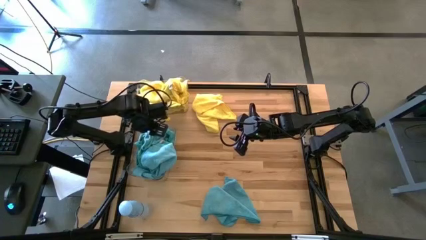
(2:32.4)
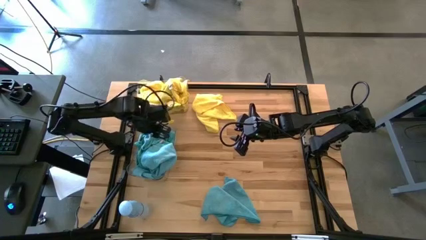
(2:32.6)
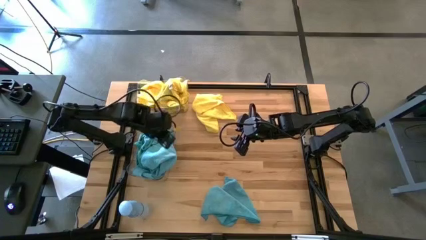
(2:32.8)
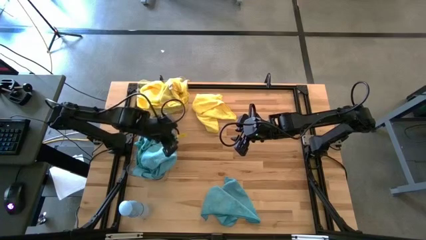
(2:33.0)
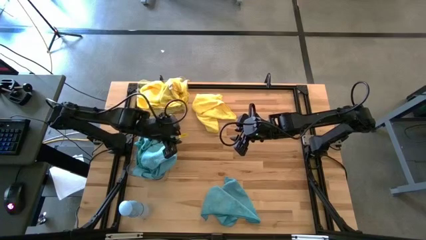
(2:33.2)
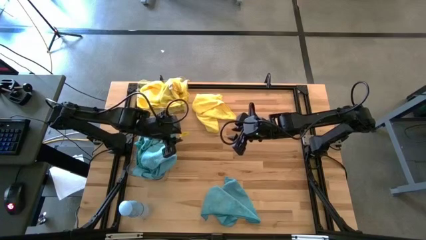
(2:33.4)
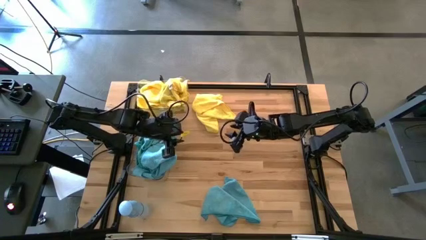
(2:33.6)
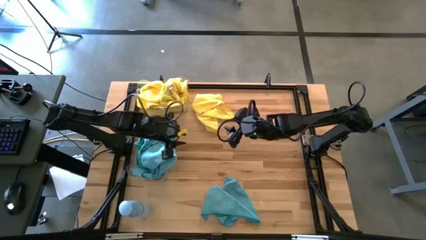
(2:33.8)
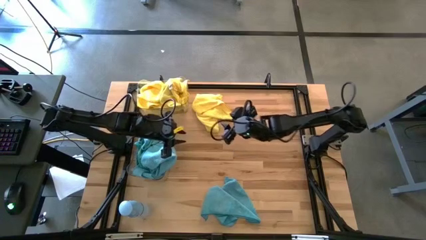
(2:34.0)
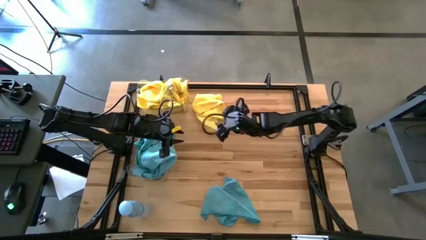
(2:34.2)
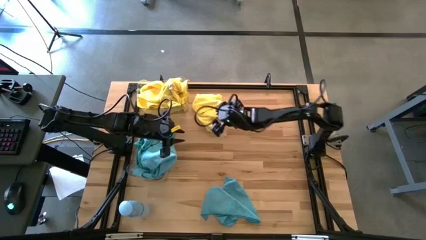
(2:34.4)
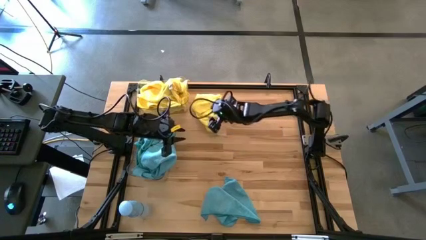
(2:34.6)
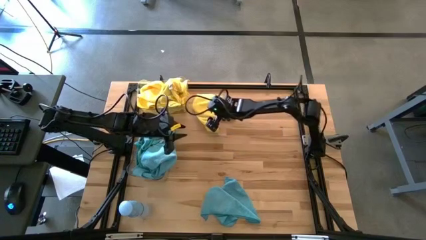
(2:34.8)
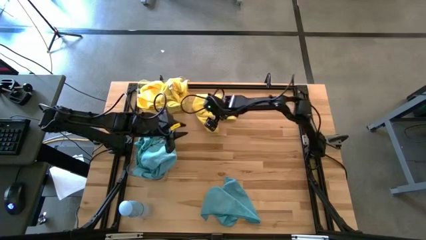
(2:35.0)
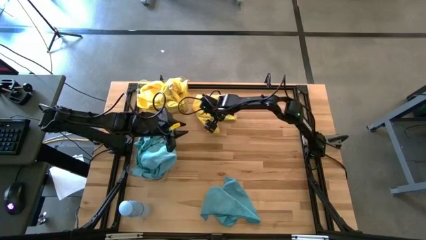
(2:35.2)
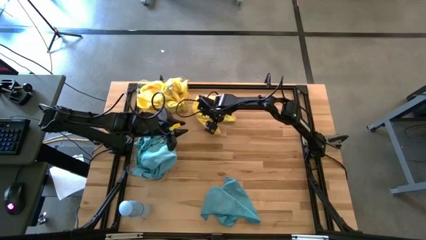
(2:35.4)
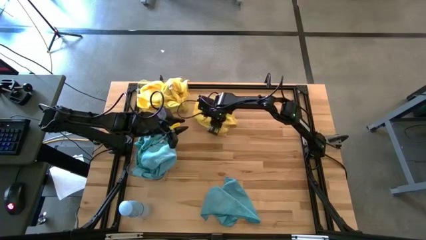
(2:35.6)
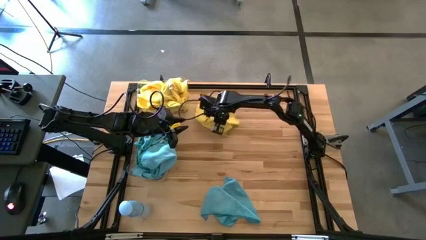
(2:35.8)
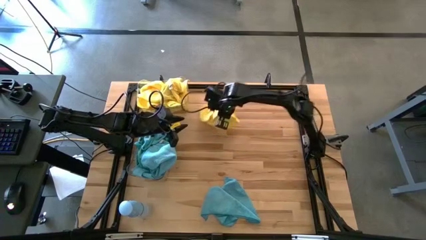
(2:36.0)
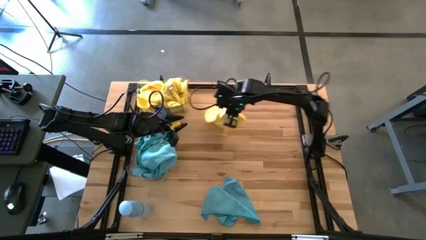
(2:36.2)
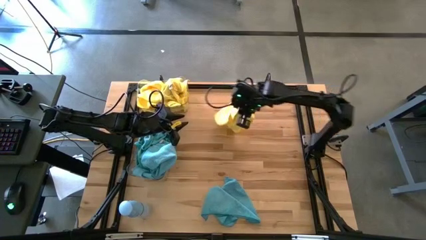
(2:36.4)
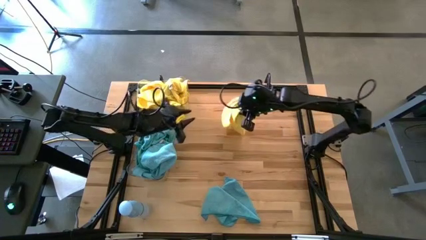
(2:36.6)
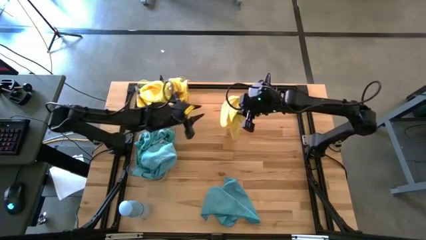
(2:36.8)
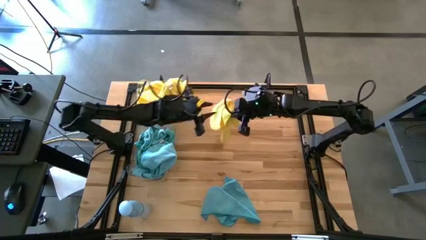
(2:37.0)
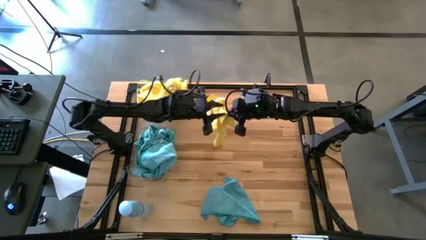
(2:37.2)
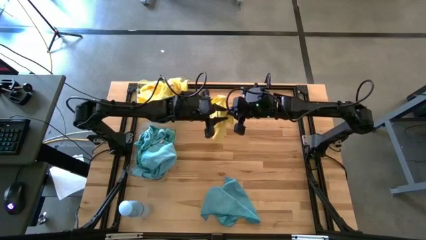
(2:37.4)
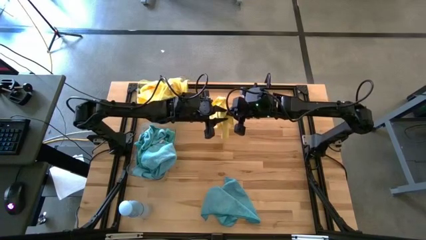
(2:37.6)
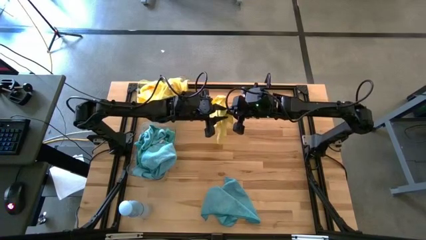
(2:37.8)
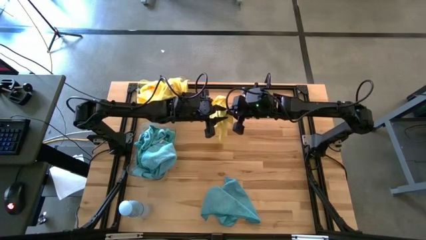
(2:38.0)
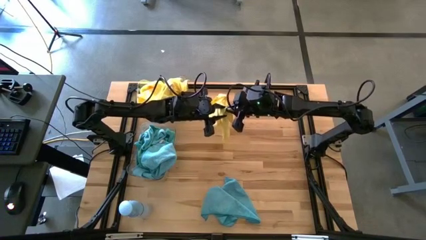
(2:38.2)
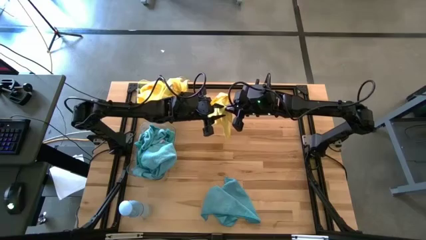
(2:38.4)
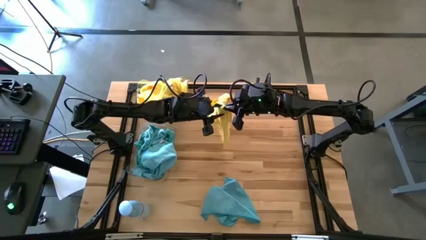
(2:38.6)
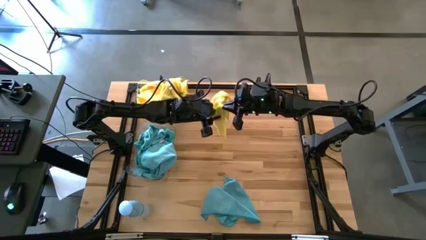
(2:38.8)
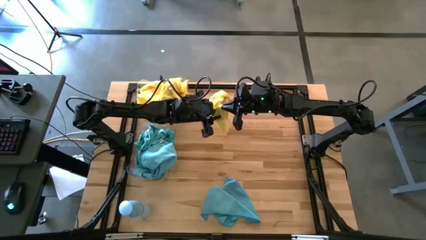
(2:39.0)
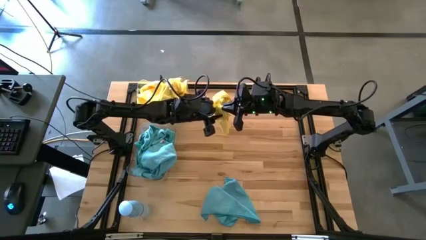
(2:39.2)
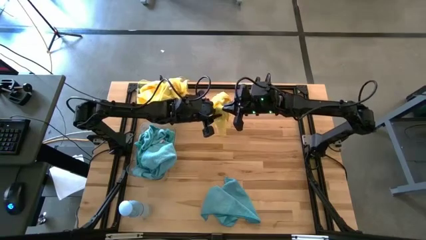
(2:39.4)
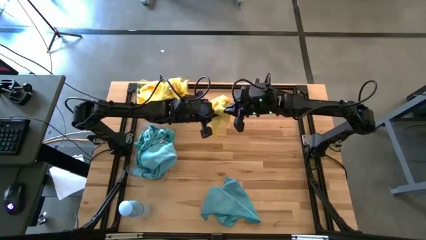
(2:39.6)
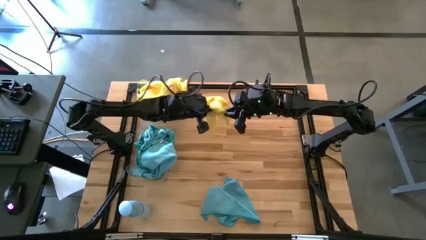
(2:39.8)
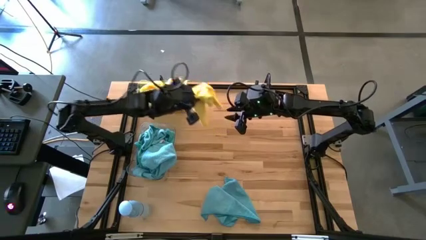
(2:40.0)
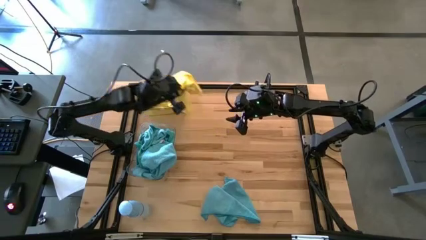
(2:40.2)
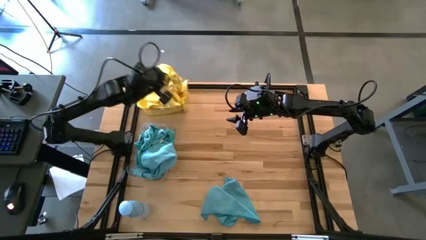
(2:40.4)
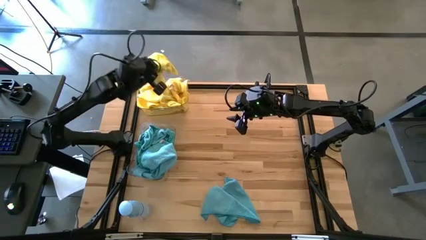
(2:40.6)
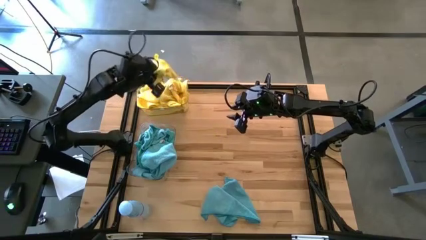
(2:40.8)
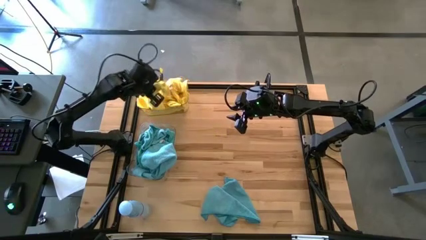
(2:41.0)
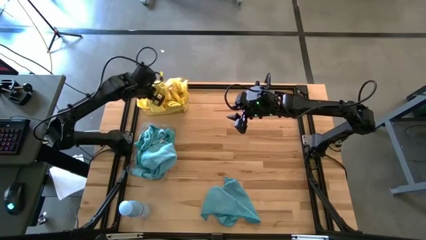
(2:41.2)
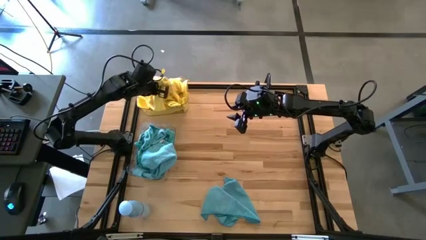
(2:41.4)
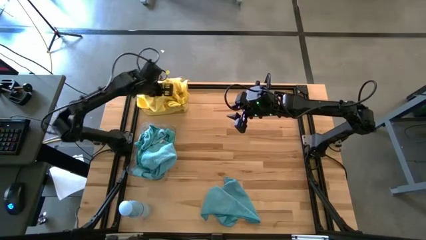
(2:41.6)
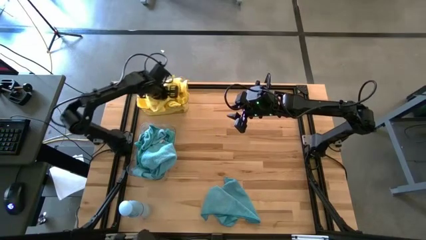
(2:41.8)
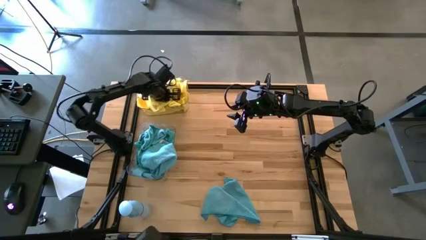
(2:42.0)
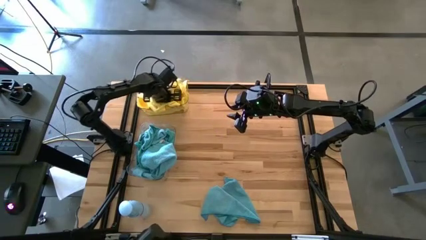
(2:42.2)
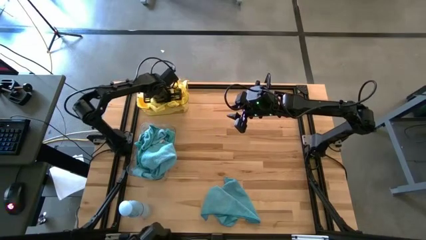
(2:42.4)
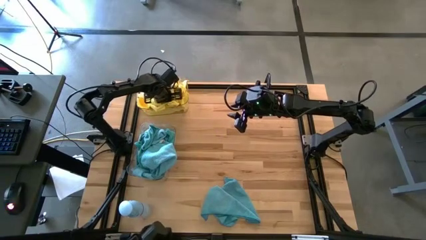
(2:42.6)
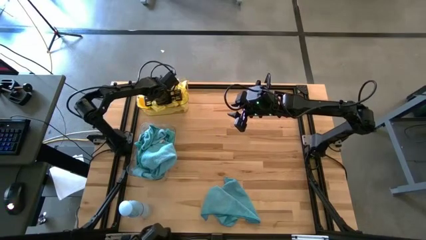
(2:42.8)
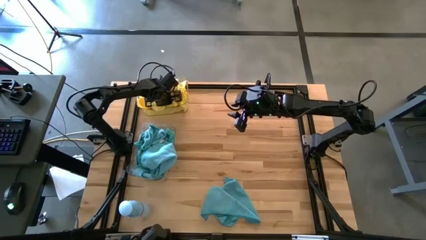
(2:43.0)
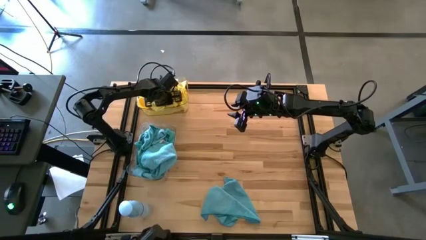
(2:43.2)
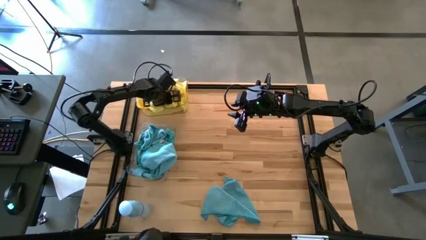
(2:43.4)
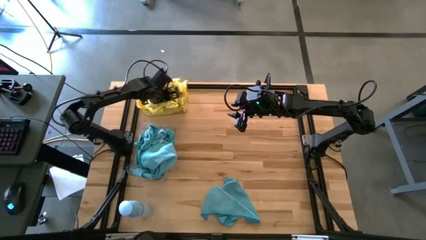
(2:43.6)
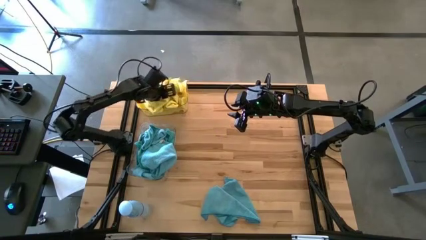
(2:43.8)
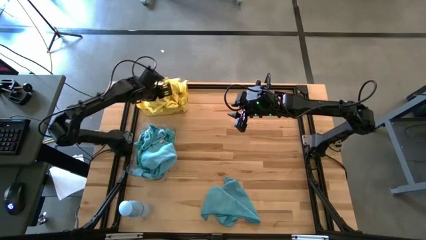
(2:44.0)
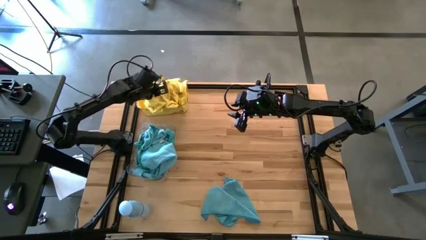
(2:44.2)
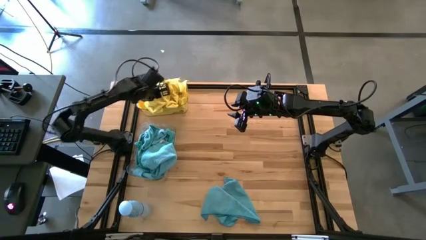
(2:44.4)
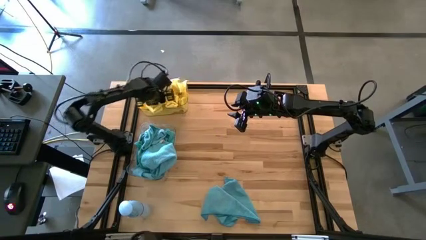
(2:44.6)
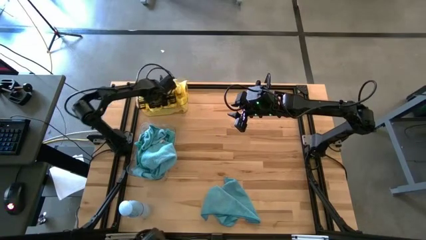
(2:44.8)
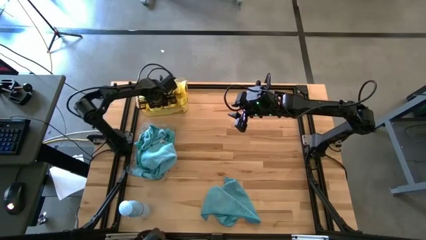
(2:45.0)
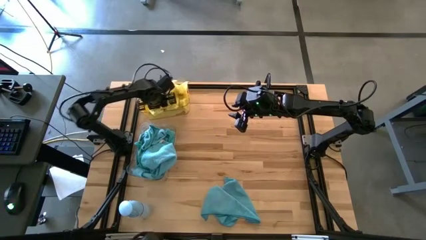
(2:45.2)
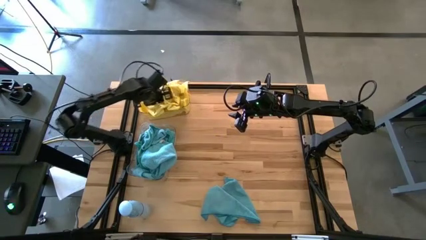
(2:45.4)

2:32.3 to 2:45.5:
Task: Sort microfiber towel by color & place in baskets
Put the yellow microfiber cloth into the top transparent bin
